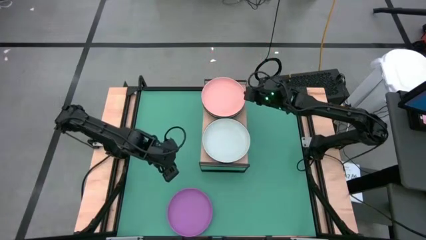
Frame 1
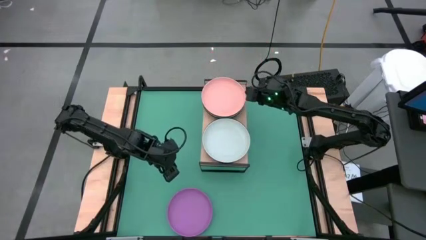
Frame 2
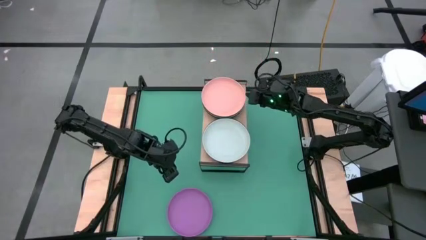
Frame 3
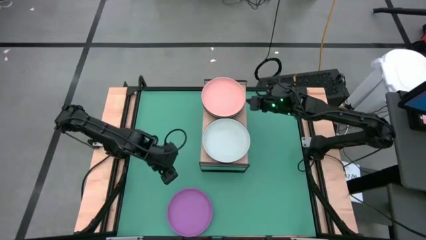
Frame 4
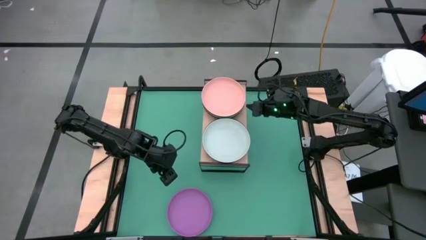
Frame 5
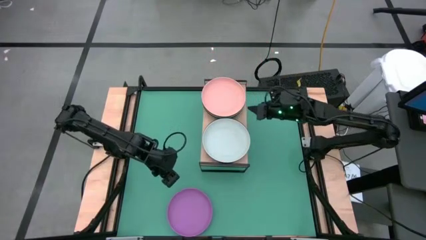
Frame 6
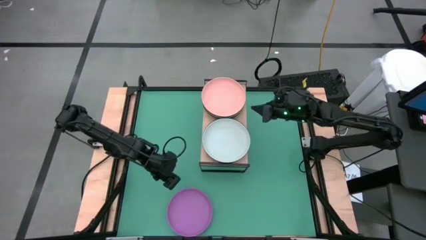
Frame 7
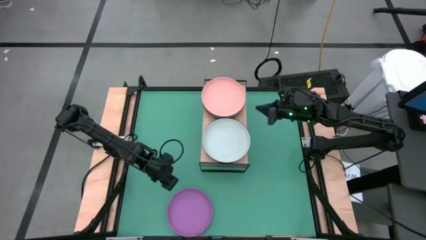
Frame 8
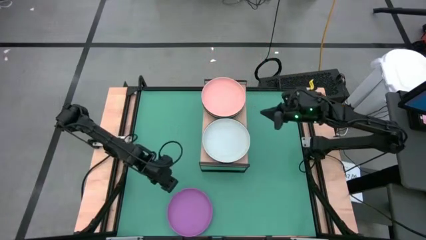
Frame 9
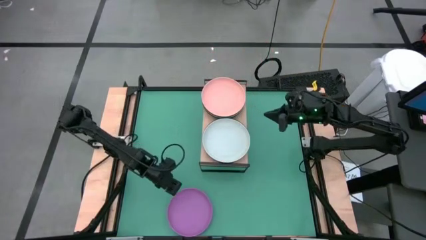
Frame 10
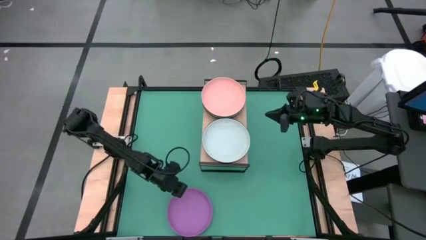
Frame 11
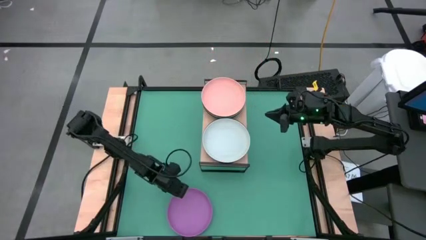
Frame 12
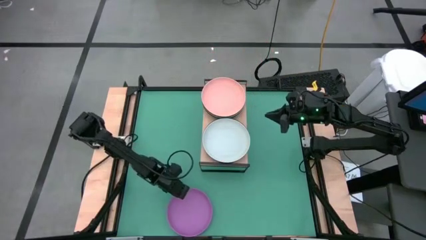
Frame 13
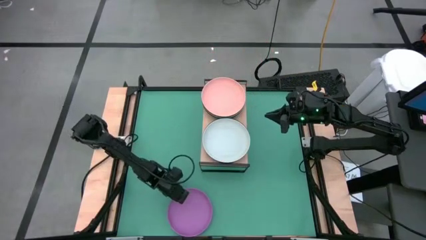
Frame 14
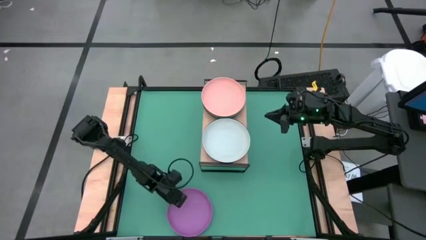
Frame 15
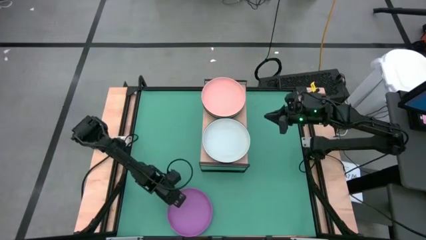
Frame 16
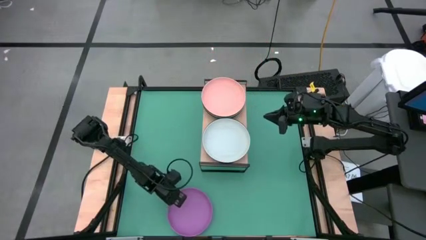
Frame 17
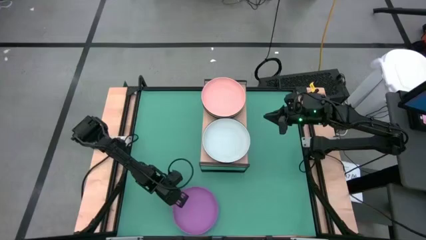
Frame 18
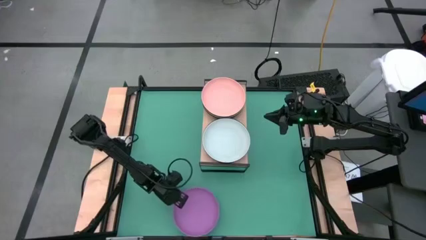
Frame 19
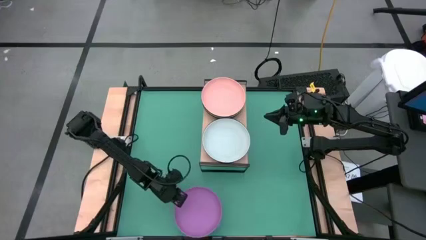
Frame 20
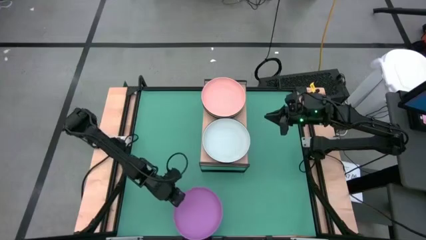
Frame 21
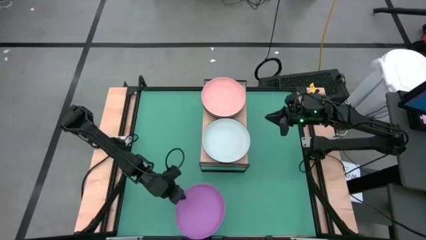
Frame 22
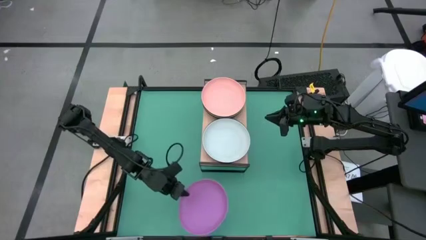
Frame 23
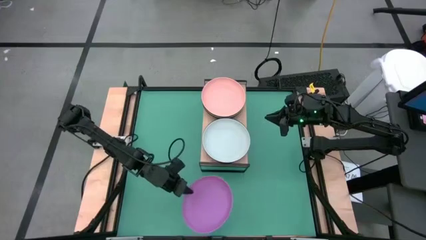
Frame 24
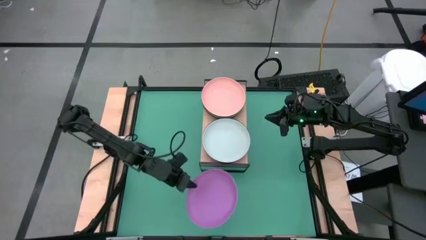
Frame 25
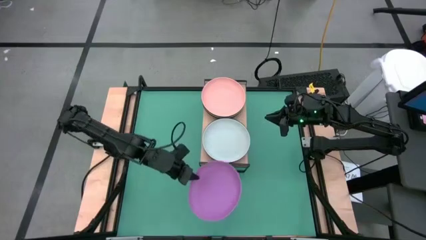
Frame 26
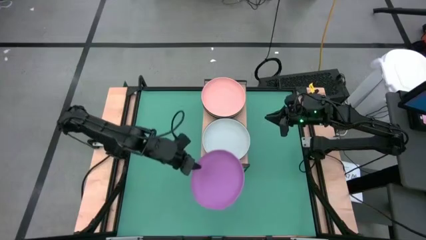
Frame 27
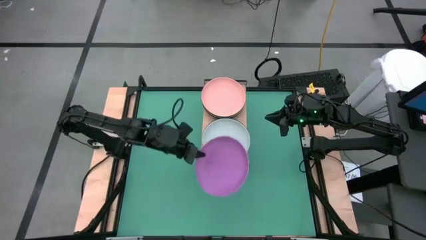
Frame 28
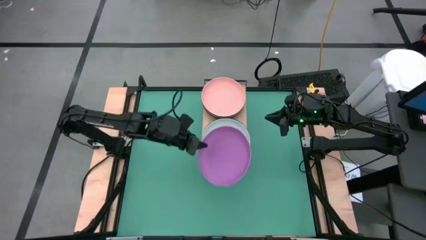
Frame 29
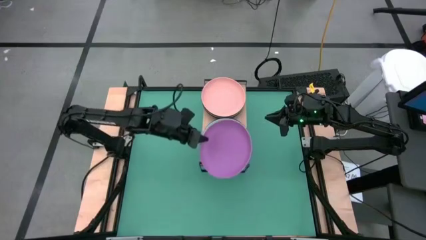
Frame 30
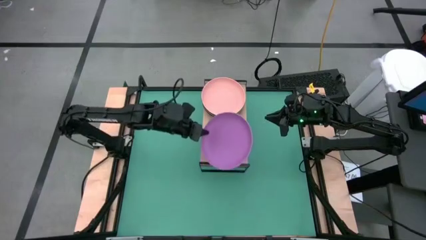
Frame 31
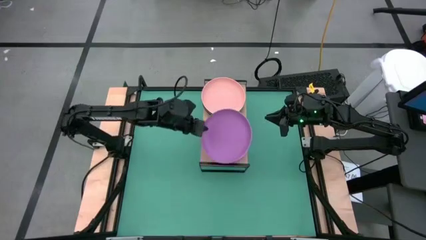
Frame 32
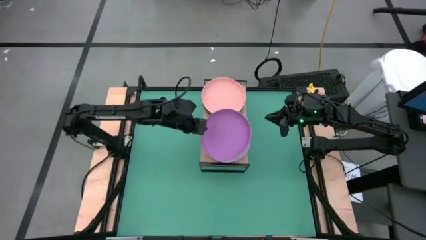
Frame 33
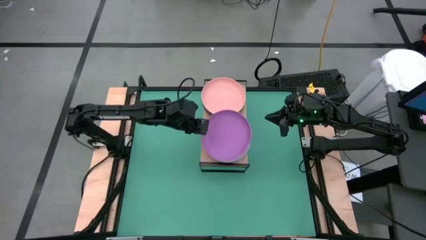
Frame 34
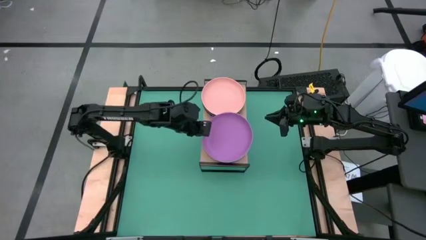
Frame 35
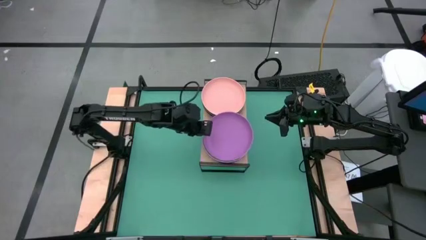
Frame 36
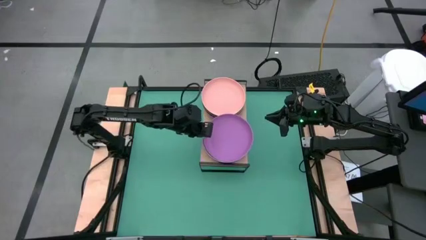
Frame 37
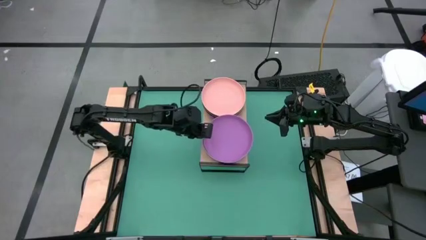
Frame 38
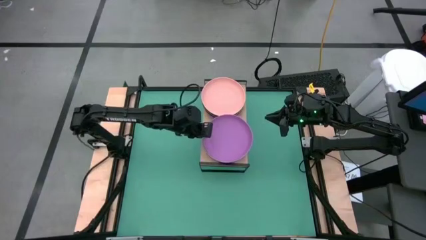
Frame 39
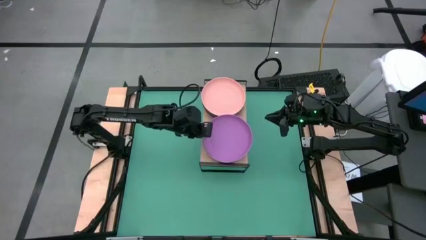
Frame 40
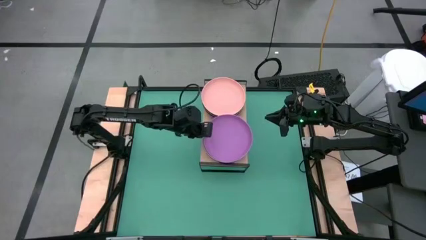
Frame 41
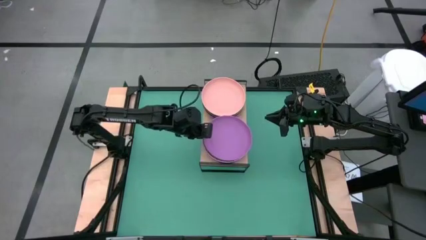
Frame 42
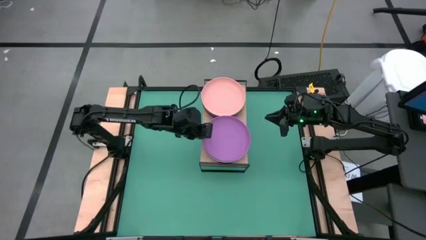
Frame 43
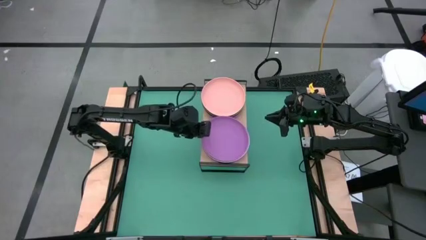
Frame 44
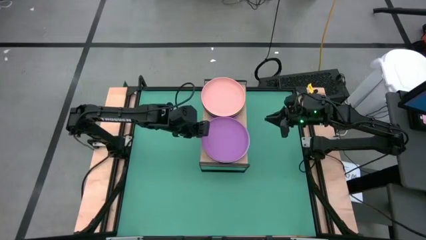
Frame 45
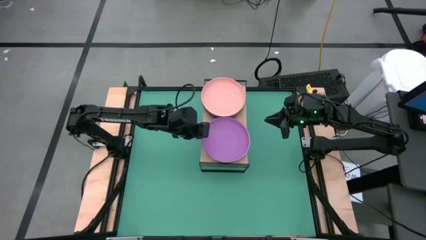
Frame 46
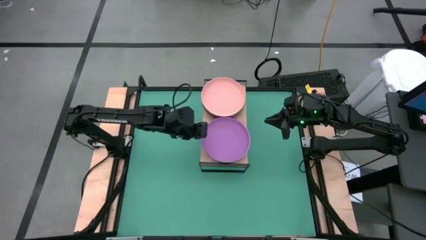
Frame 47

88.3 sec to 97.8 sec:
Task: Place and stack plates onto a shelf
Stack the purple plate on top of the gray plate

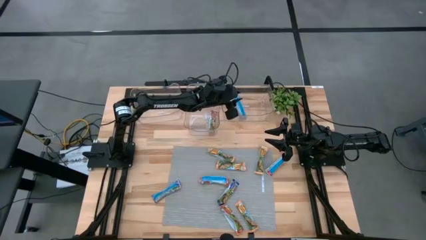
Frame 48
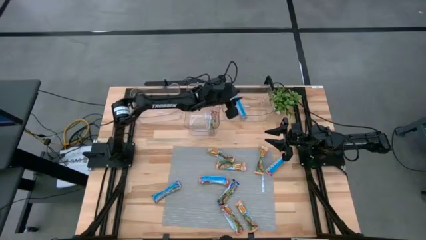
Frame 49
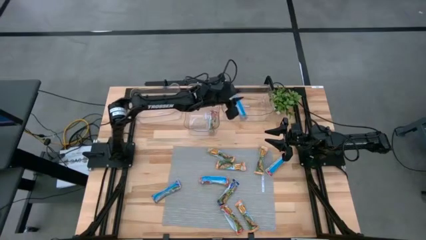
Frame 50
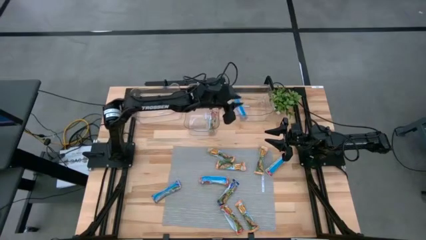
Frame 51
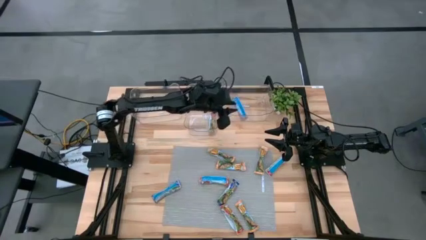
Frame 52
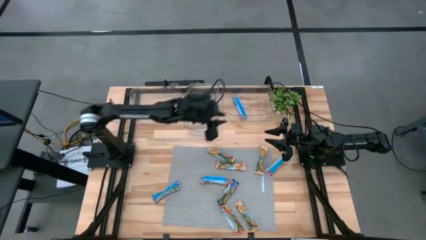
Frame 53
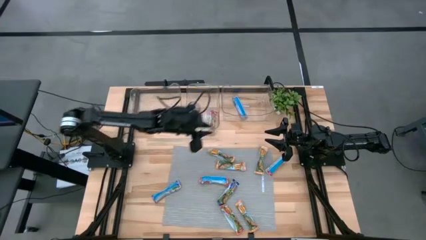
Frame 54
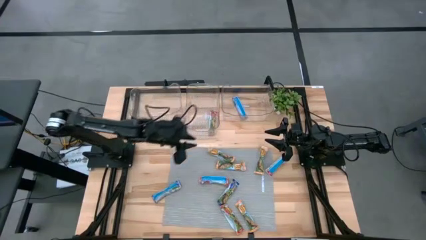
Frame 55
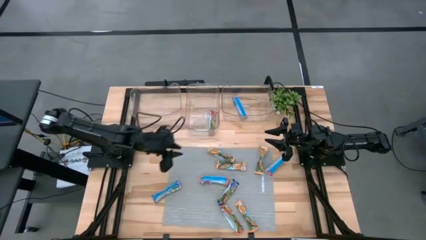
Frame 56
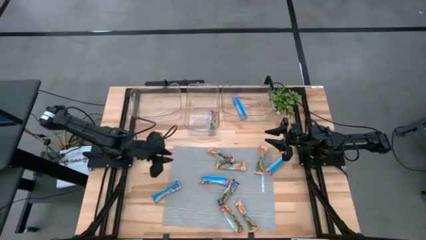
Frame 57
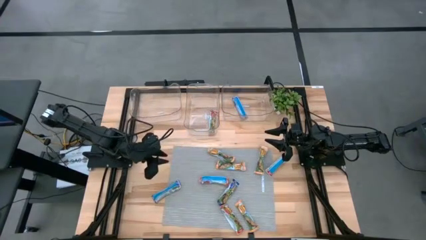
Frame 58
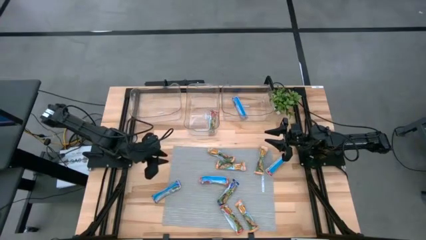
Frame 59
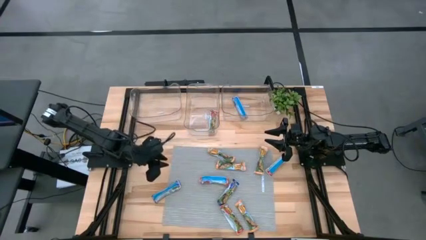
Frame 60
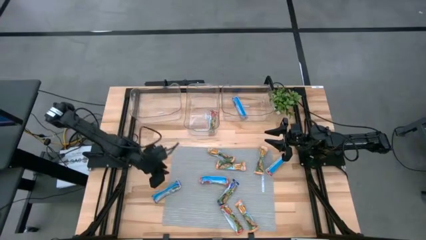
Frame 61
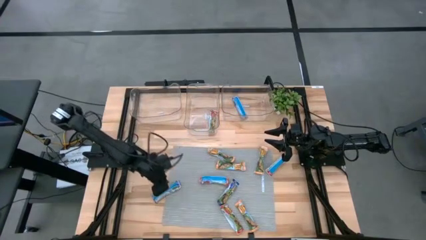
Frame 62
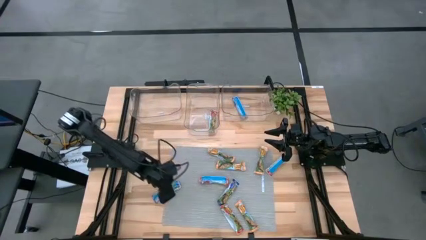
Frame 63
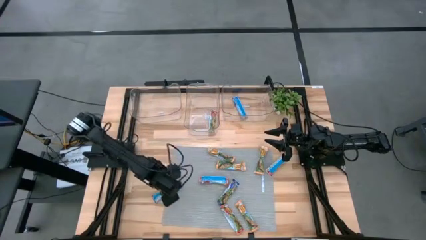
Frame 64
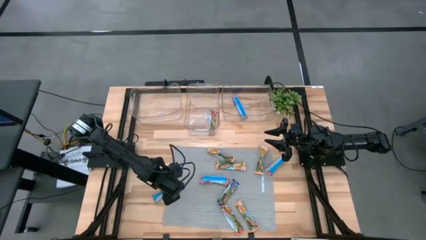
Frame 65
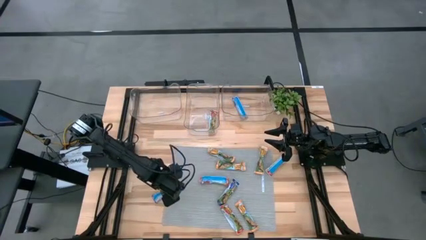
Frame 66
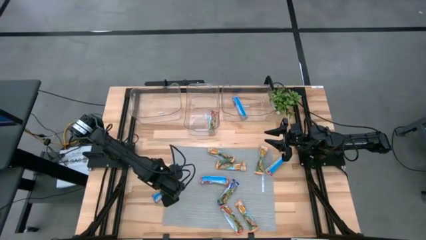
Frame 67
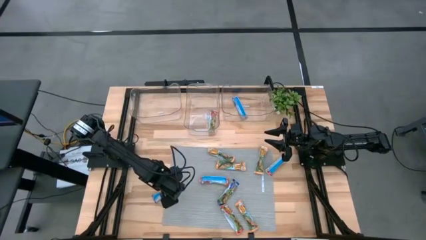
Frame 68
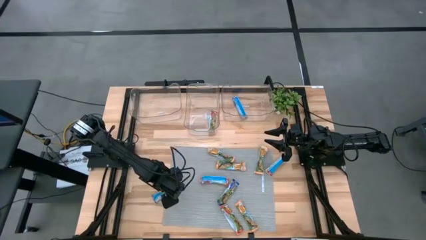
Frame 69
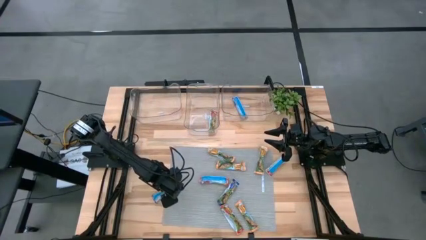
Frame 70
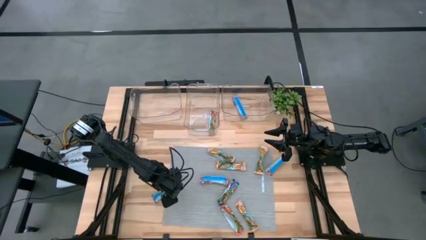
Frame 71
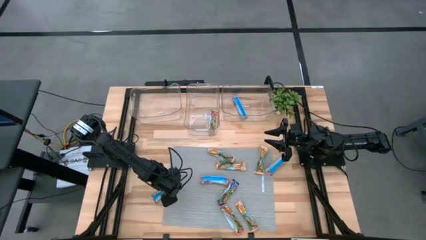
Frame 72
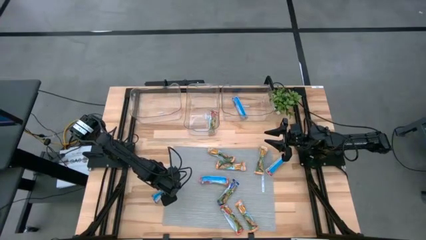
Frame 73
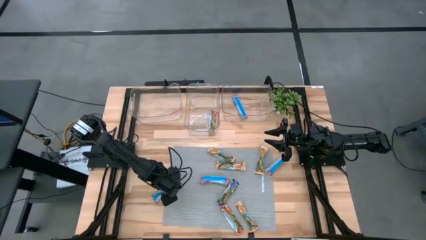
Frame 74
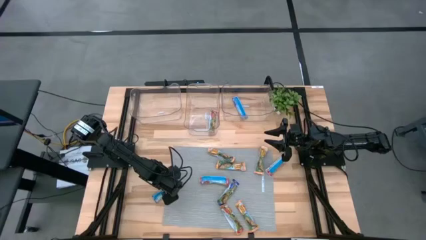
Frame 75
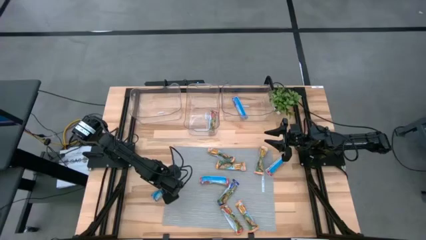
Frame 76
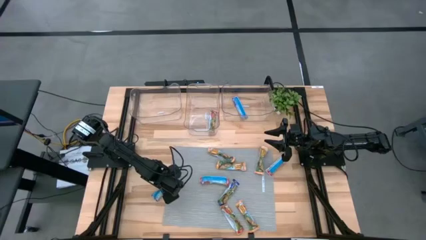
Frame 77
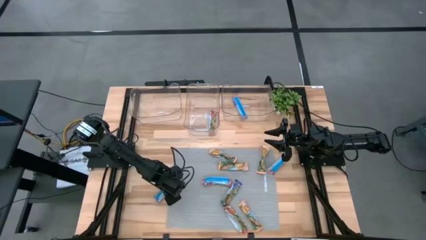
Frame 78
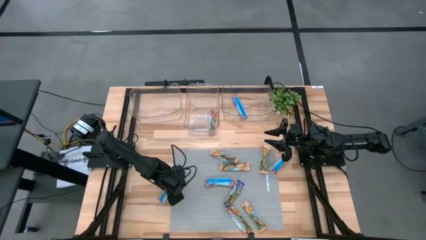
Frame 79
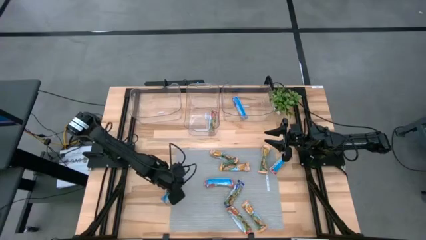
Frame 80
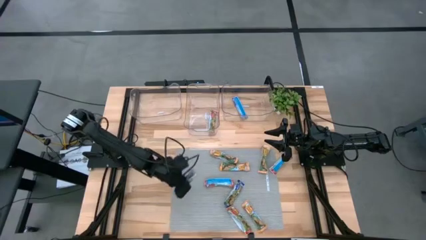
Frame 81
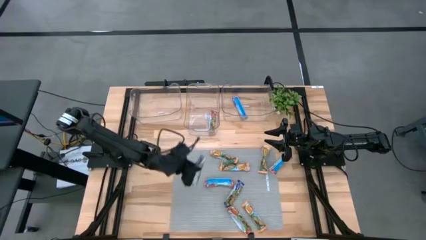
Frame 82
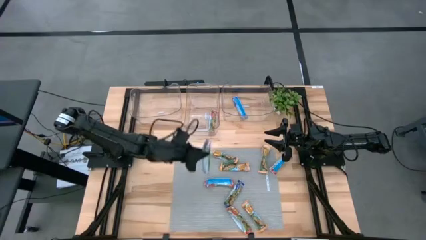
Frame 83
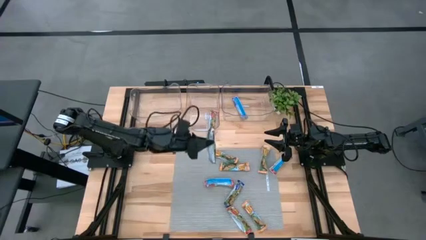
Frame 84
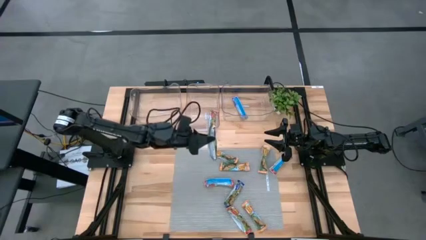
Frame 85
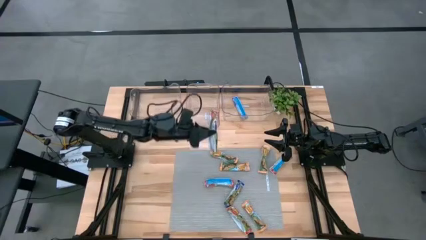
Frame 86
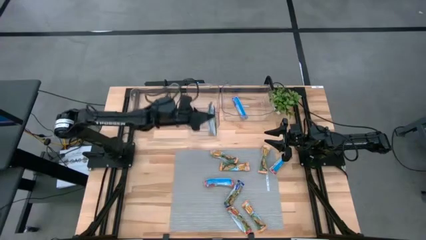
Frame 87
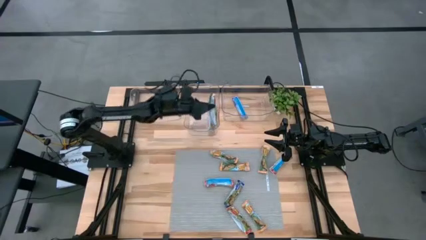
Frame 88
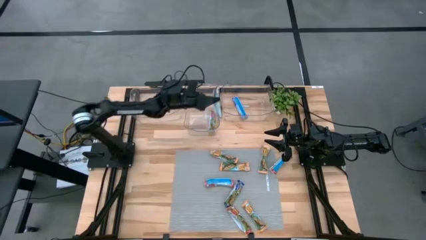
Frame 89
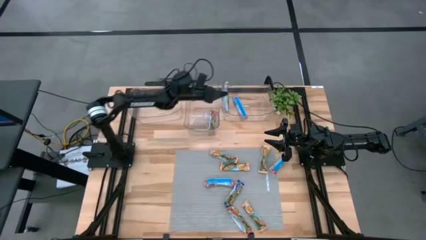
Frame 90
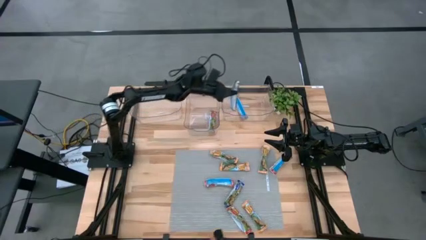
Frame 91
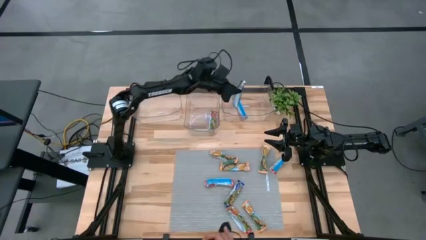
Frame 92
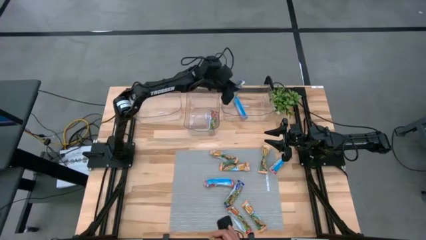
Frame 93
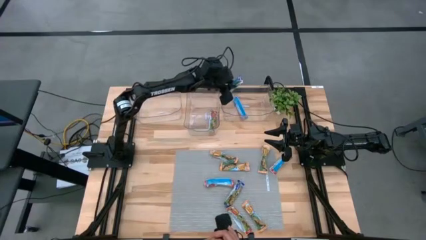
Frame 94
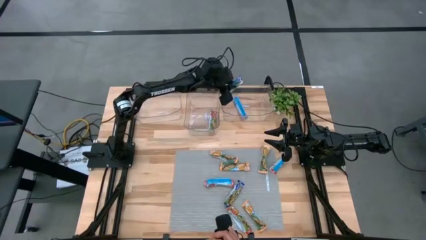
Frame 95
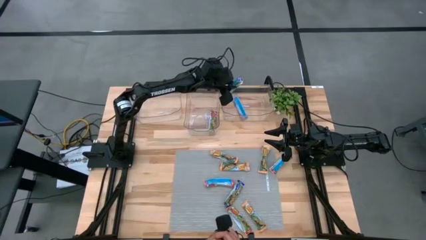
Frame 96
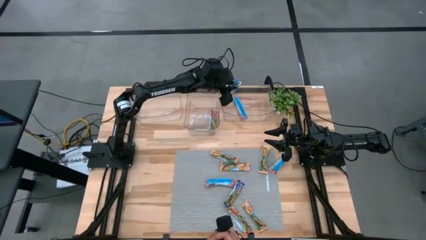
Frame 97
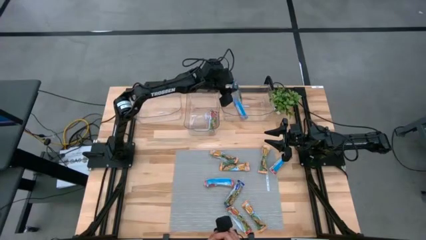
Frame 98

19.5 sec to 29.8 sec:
Task: Pick and place Granola Bars by type
Put the blue granola bar into the right transparent bin
